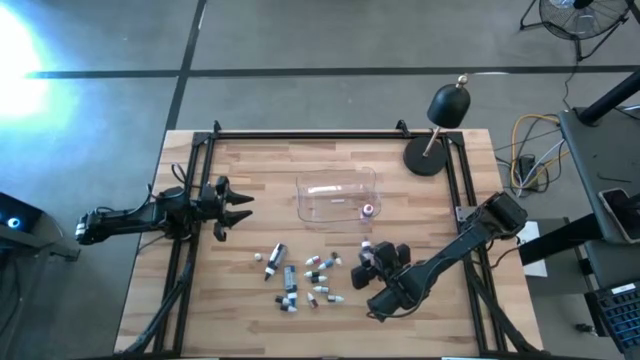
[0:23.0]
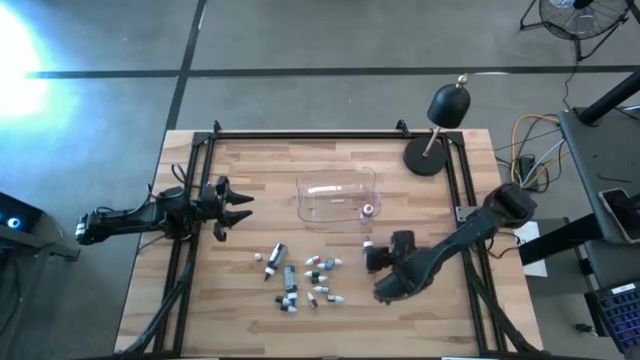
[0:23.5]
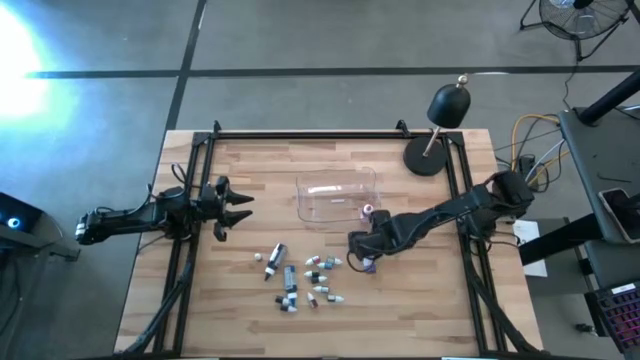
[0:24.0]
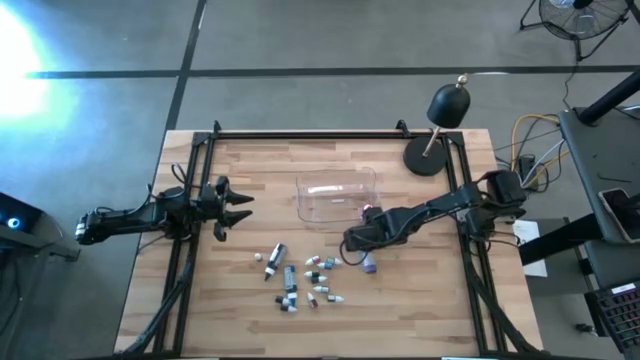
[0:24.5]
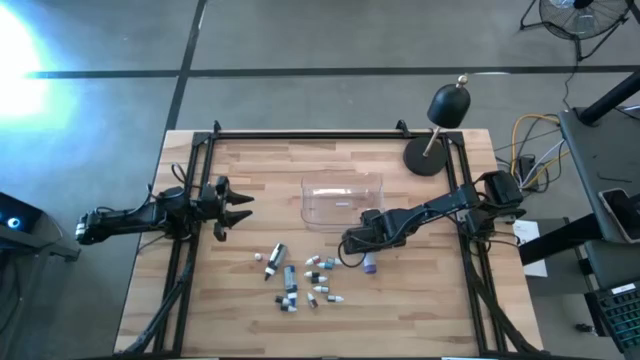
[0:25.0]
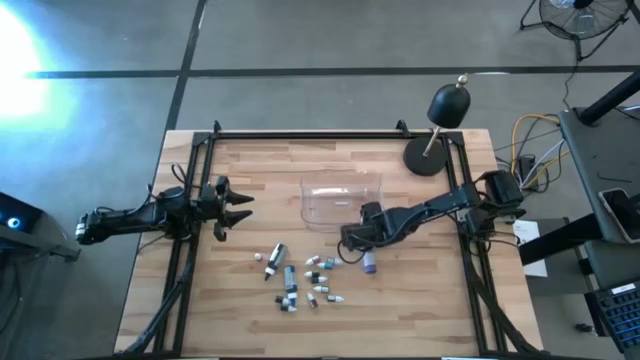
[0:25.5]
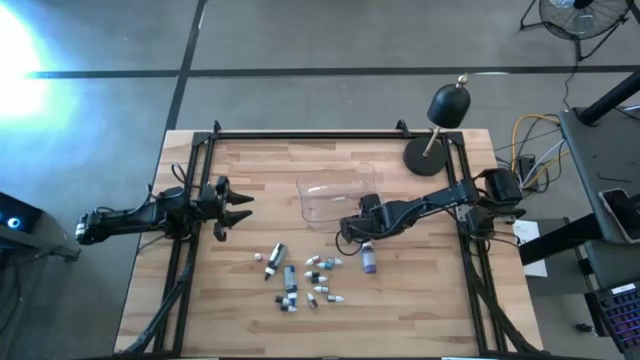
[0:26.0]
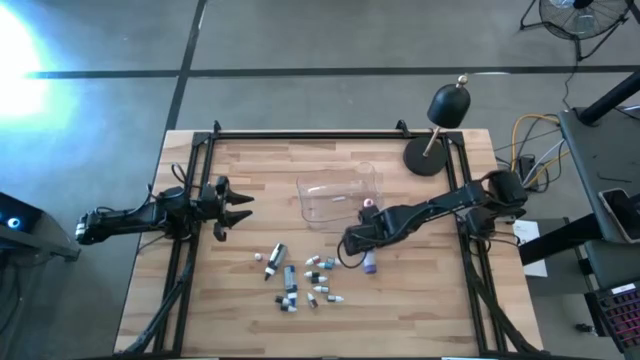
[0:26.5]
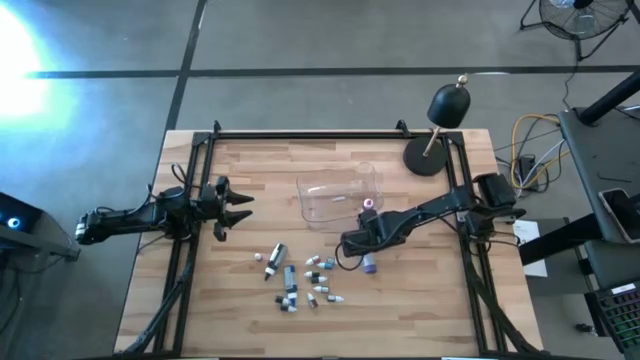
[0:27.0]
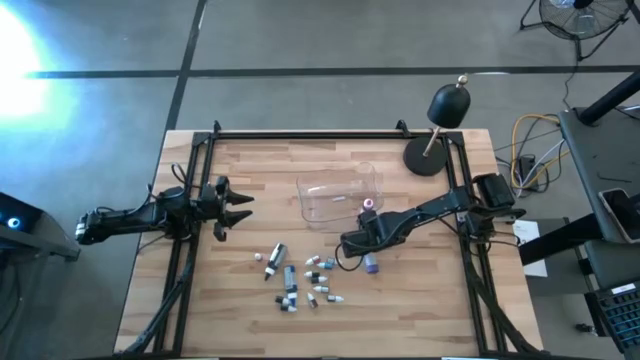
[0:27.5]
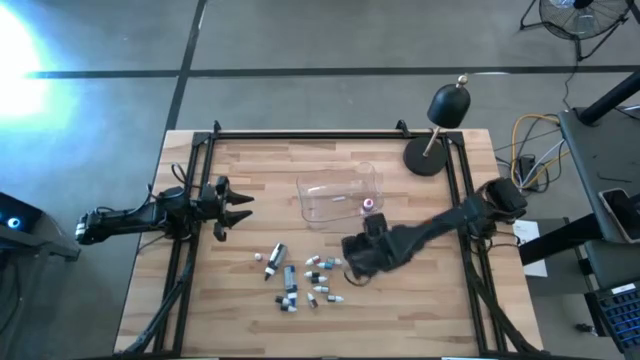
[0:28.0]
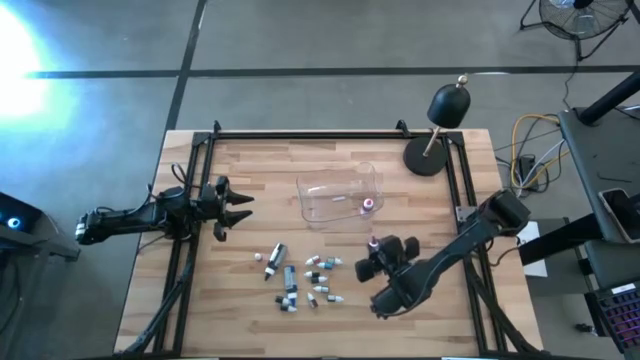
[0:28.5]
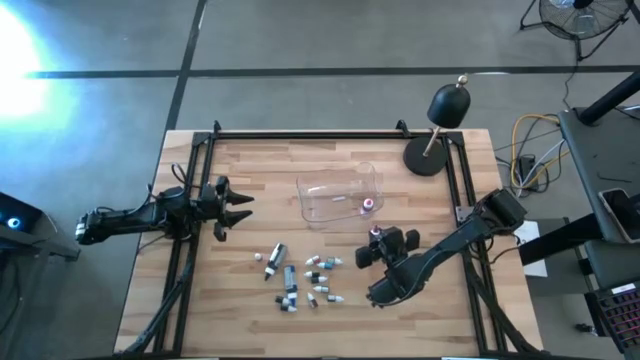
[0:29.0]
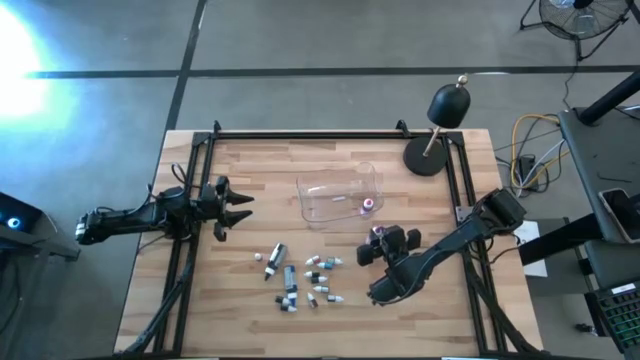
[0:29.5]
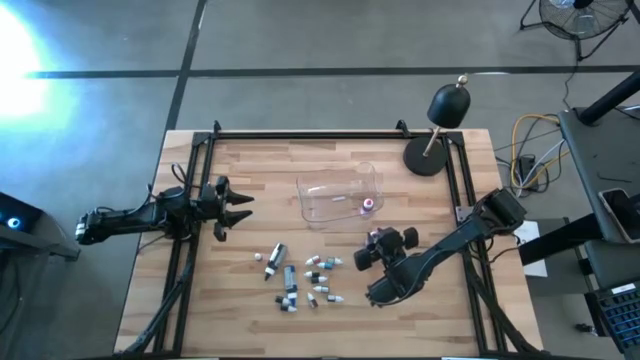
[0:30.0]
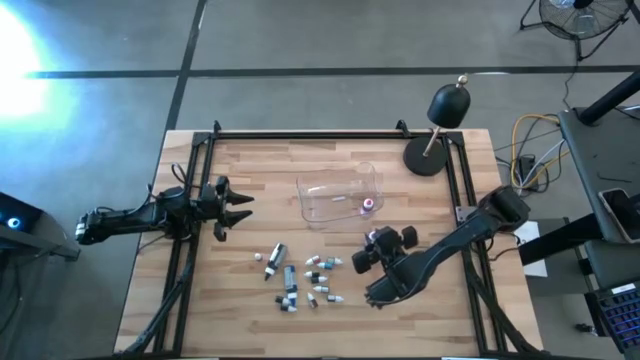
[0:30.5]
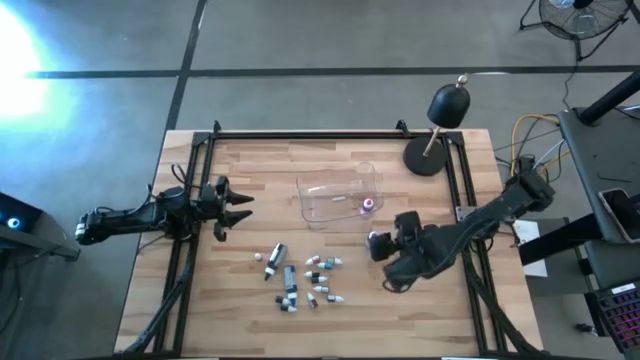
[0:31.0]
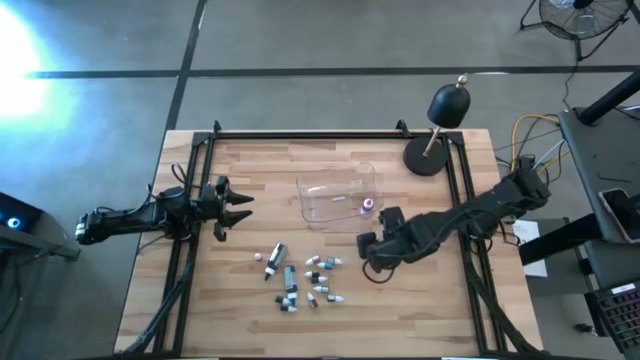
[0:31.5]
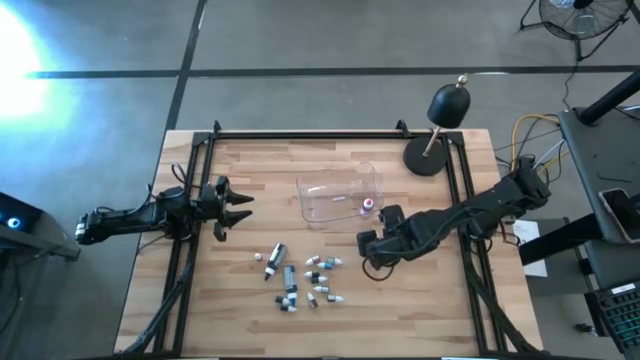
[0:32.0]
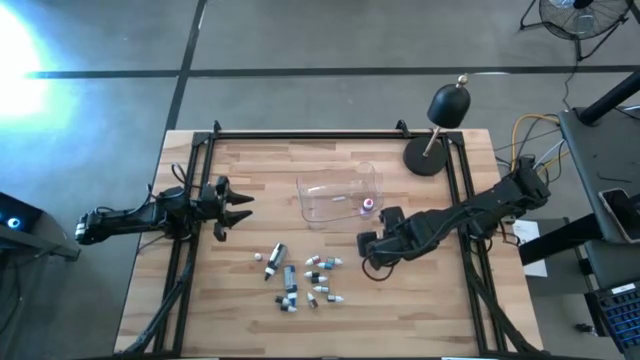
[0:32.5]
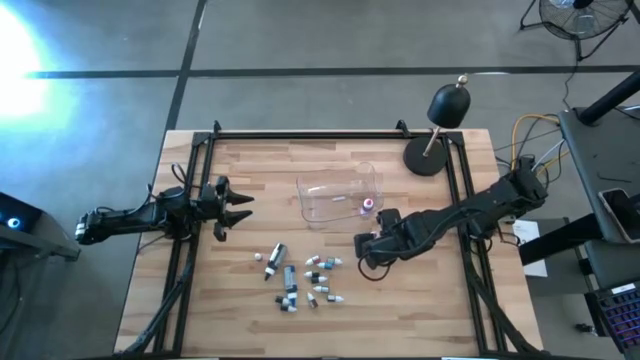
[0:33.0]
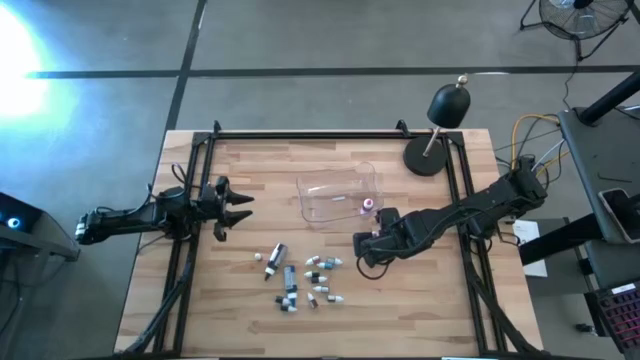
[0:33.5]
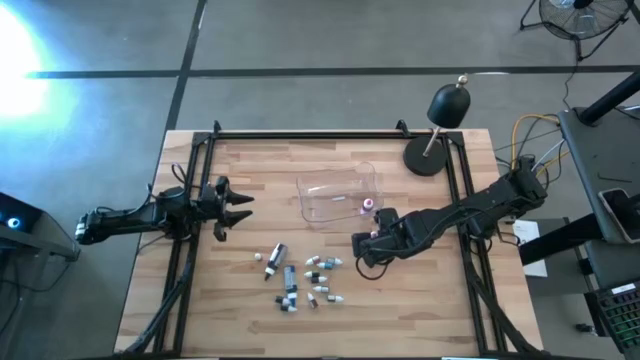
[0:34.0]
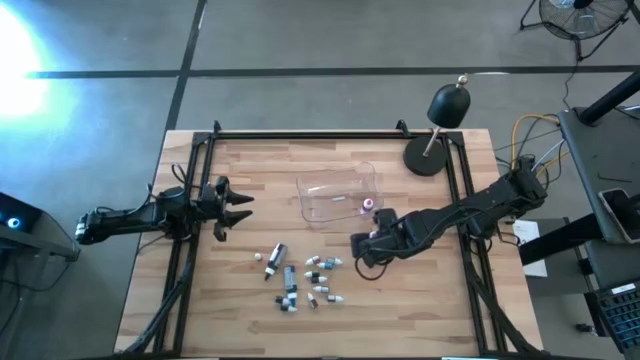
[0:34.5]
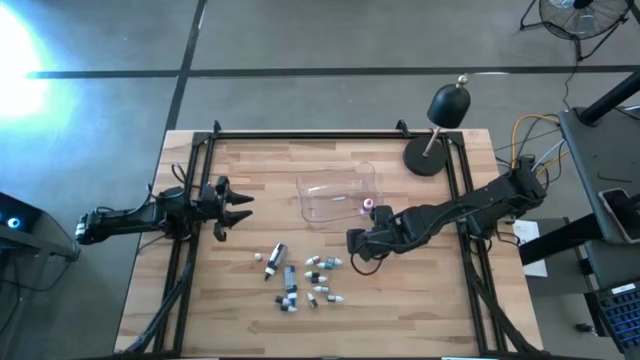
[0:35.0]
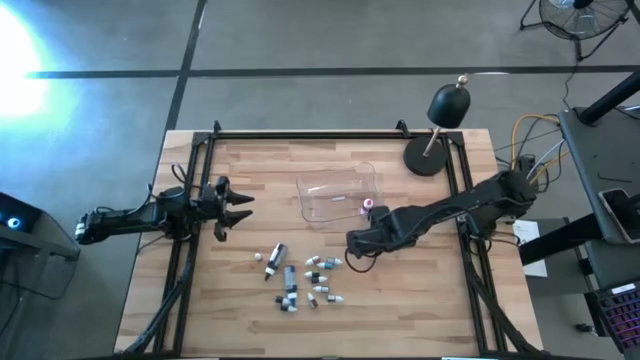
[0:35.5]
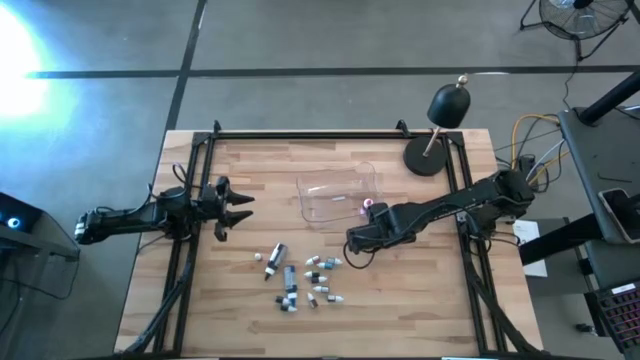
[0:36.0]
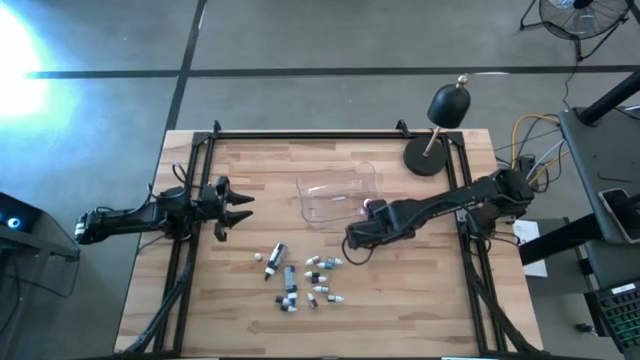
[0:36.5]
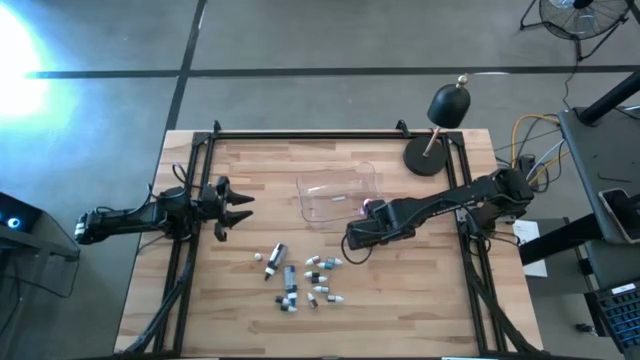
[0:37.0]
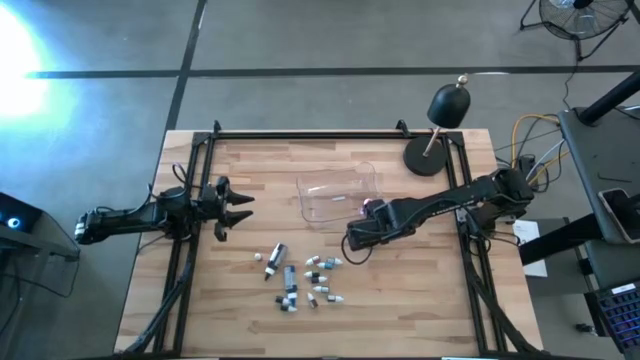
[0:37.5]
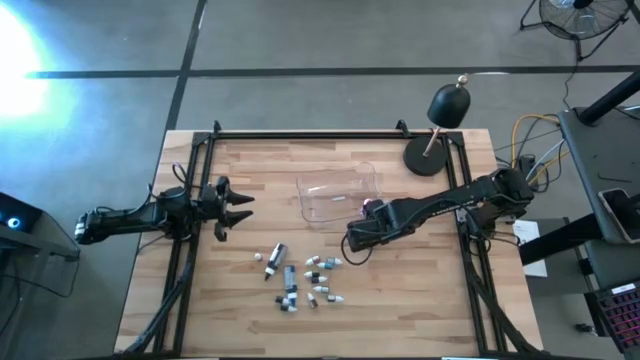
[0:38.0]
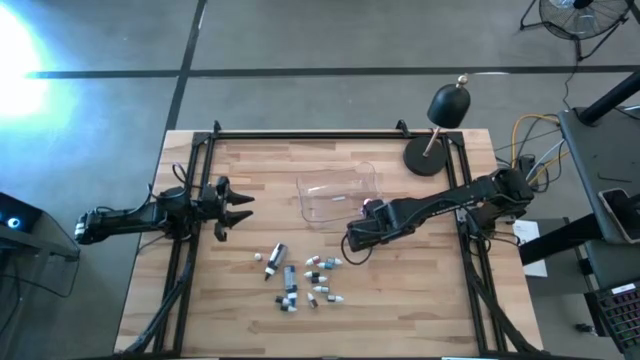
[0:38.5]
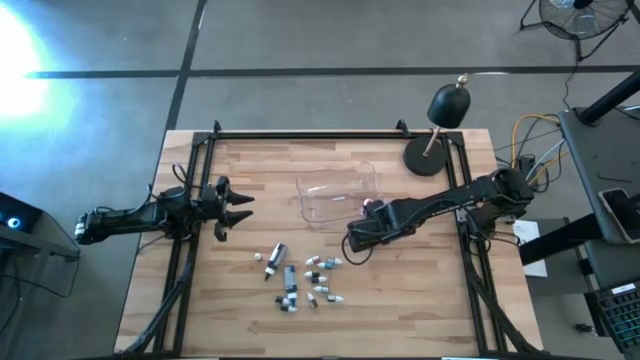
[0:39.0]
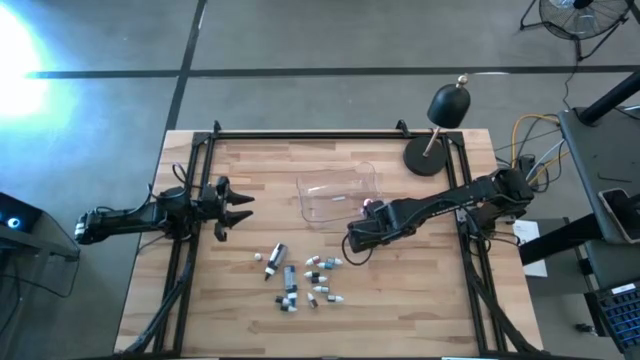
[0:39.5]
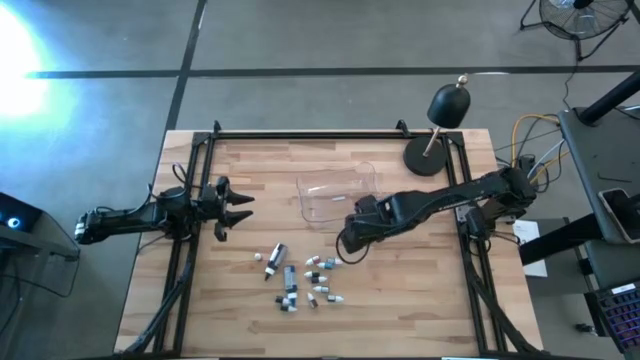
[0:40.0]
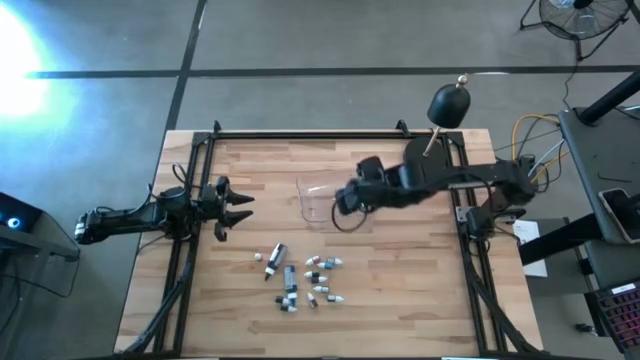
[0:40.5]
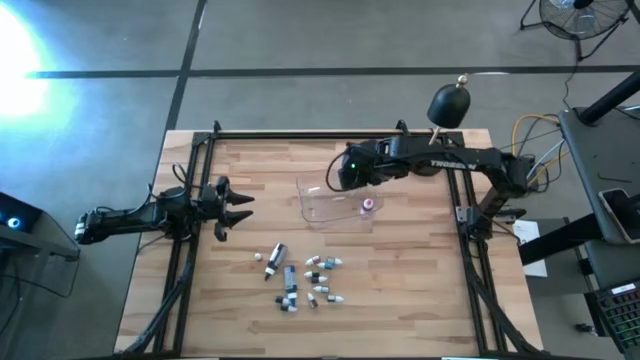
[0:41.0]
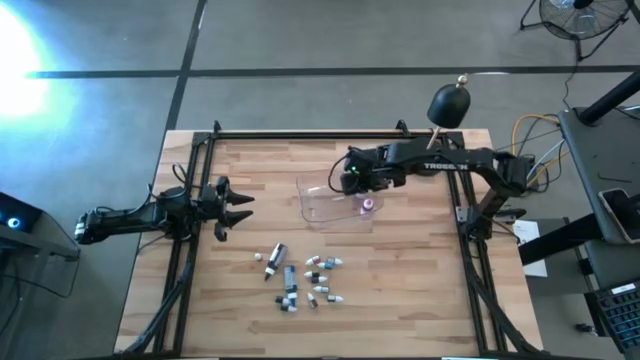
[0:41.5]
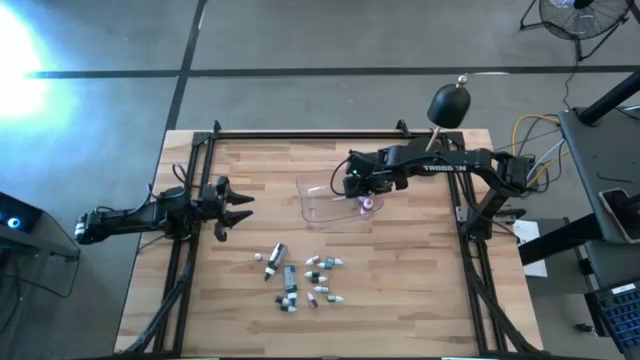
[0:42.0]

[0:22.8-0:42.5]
Task: Pick & Place food coloring
Put the large violet food coloring bottle into the transparent bin
